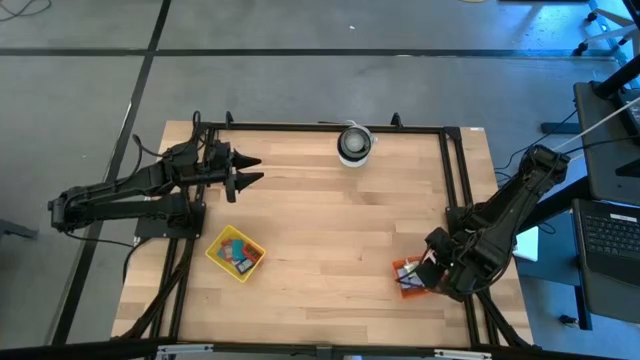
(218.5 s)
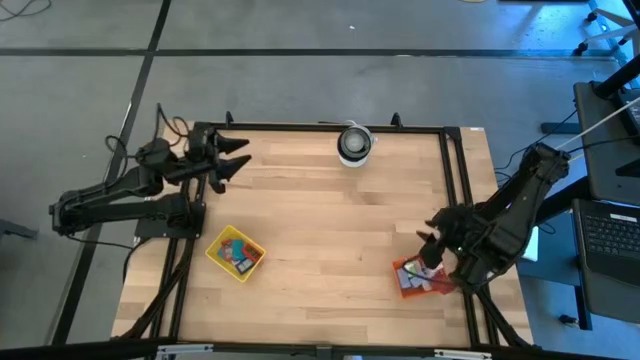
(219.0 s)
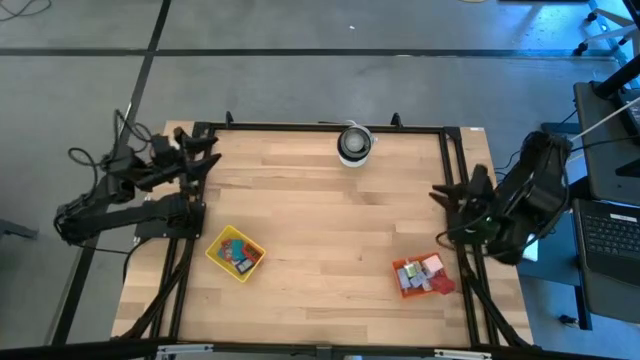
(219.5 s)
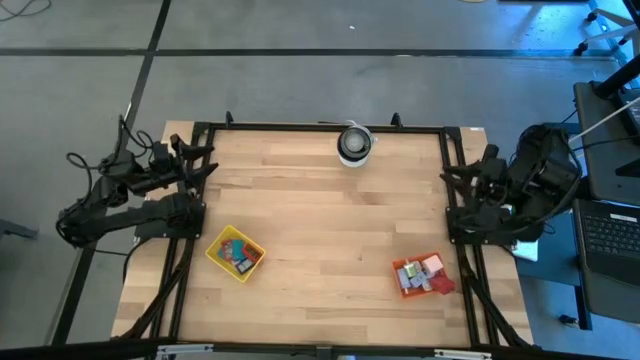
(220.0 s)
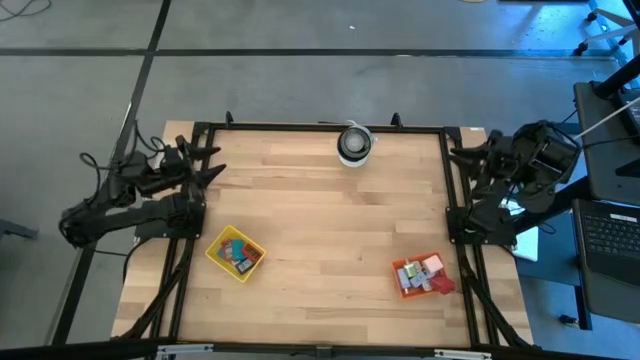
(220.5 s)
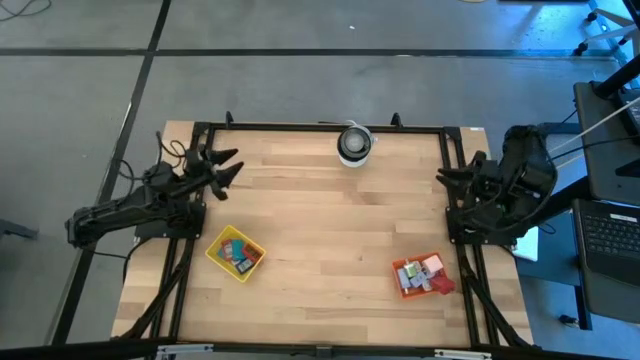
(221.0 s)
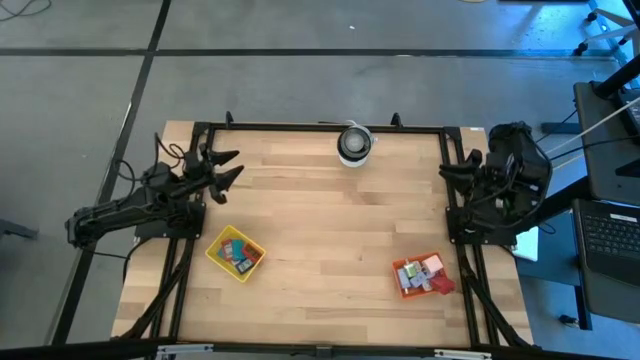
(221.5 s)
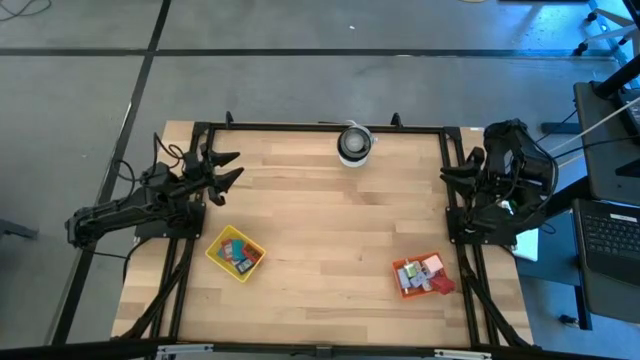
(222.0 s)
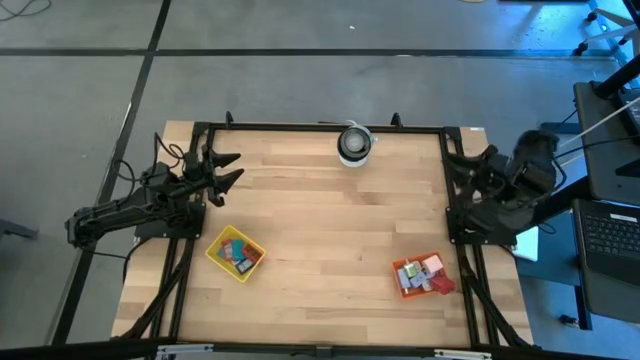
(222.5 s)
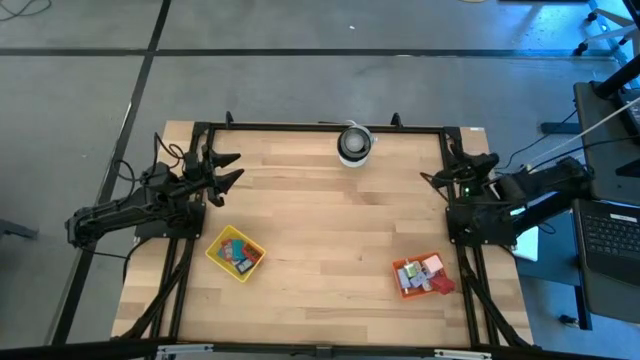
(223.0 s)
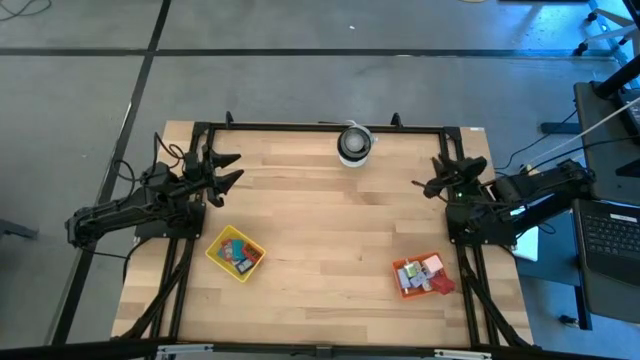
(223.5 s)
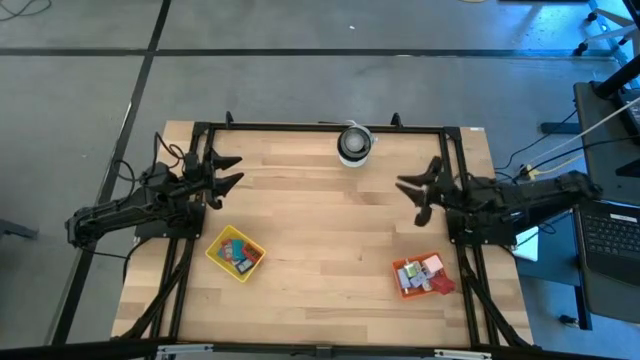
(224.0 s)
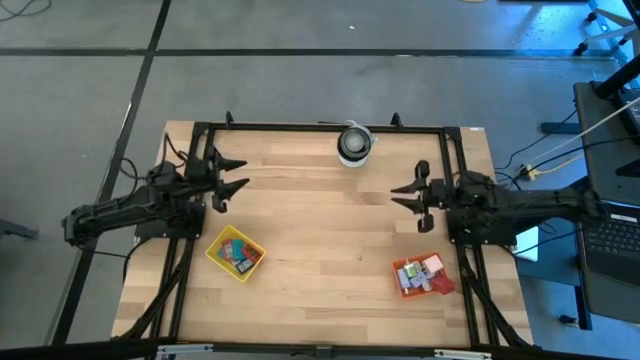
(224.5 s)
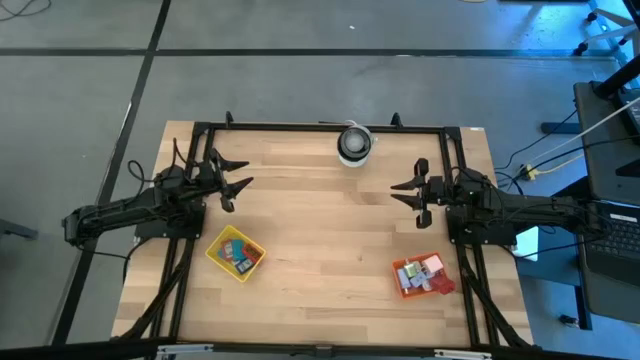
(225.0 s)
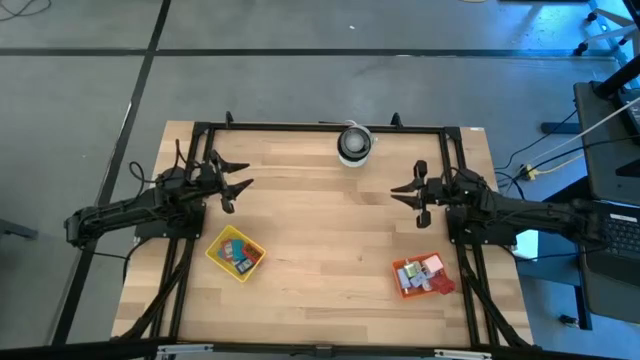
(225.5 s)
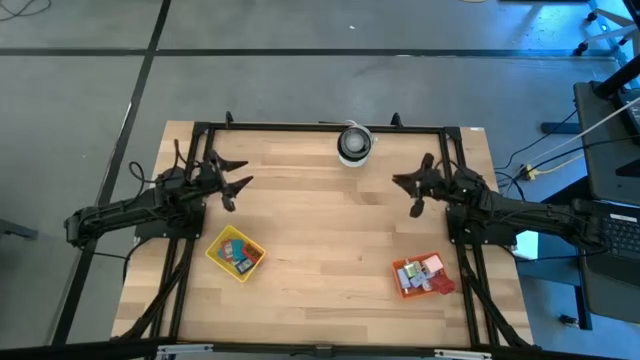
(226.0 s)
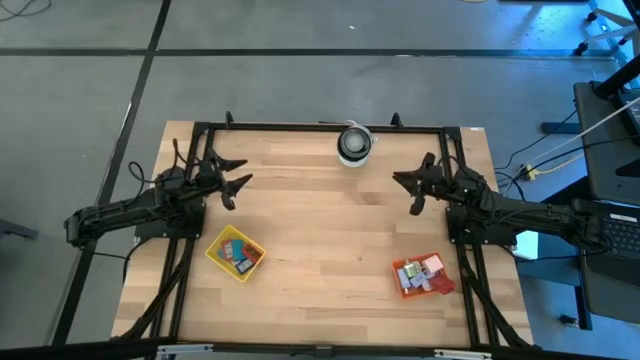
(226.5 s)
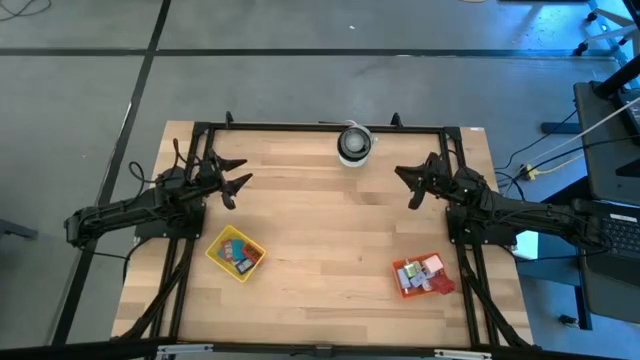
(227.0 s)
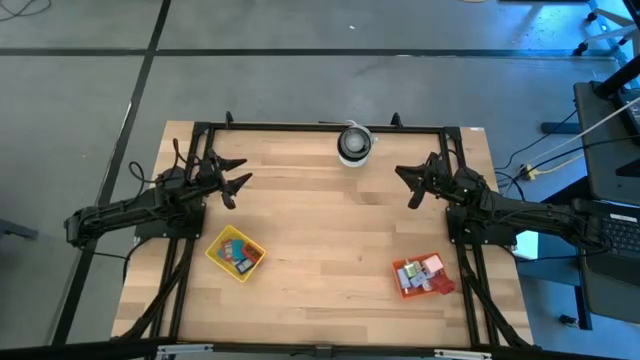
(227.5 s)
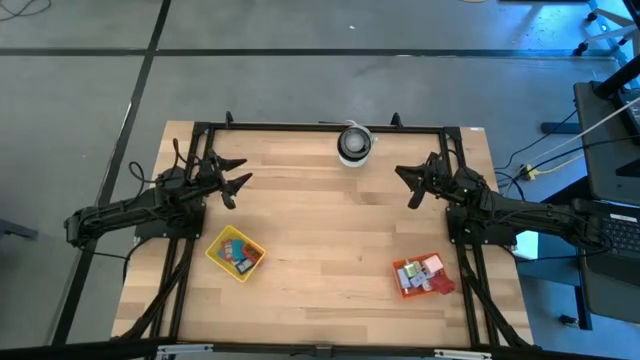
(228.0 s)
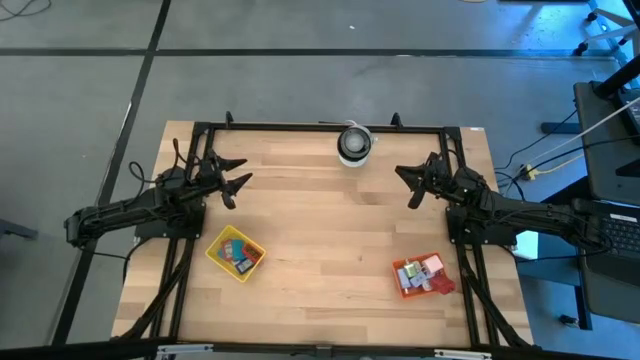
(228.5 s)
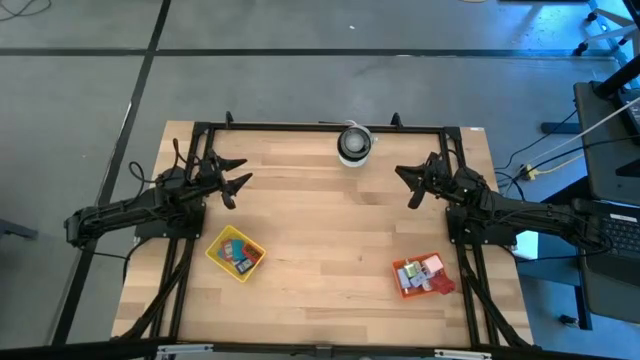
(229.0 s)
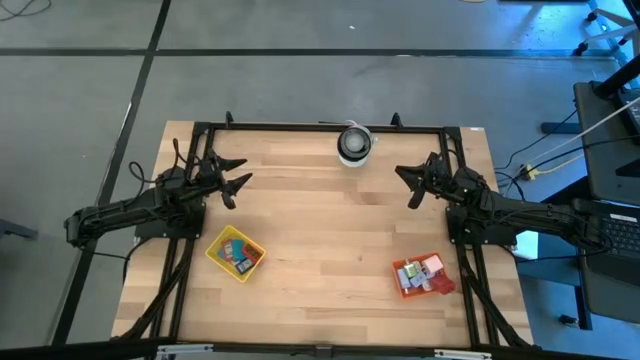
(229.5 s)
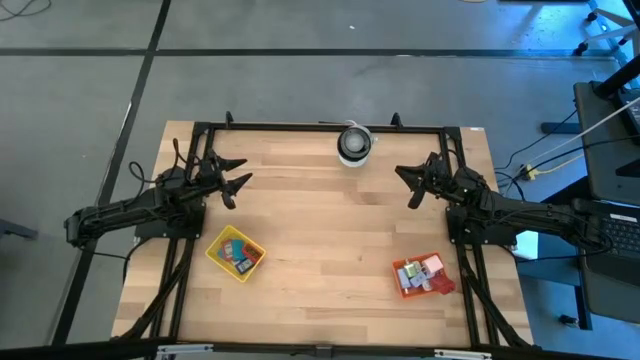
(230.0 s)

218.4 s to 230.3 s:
Task: Pick & Place Office items
Return to Home Position
